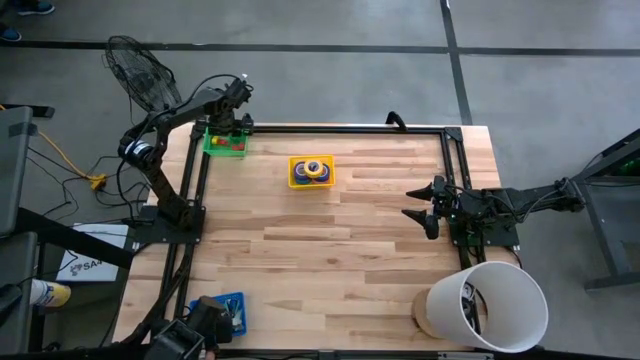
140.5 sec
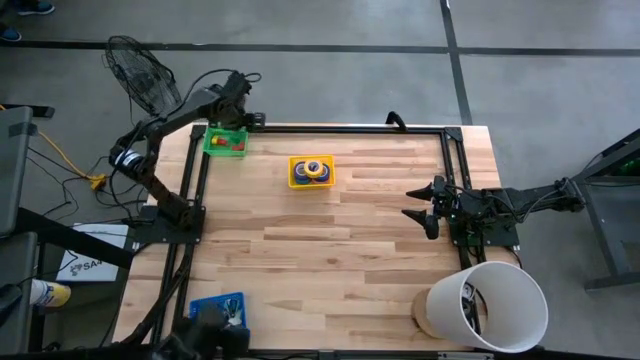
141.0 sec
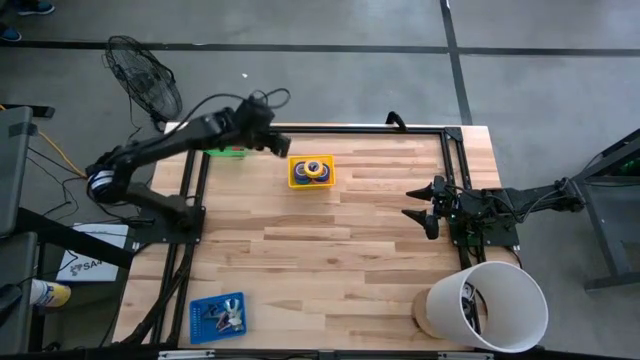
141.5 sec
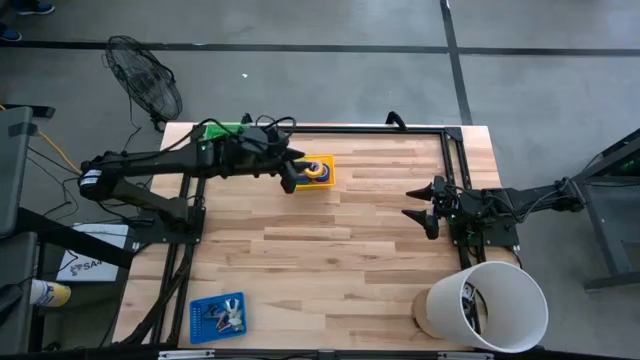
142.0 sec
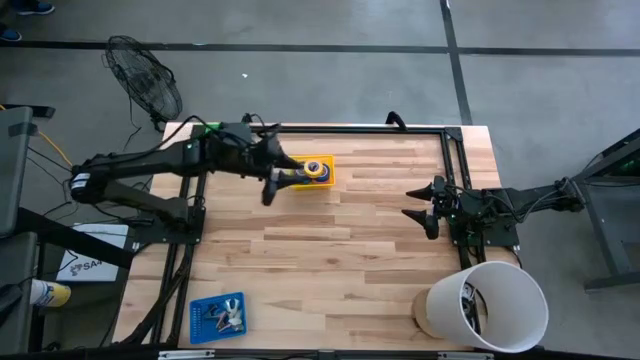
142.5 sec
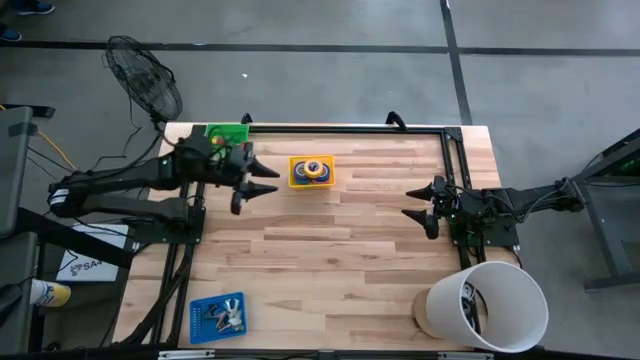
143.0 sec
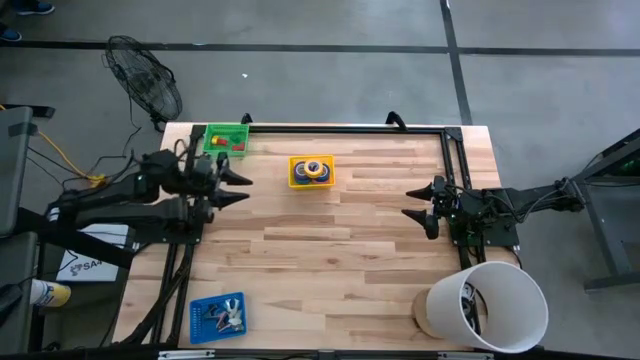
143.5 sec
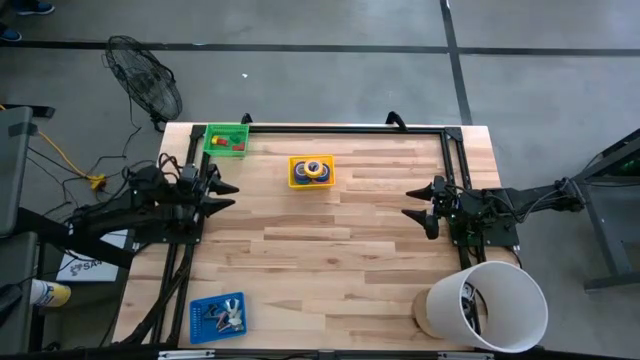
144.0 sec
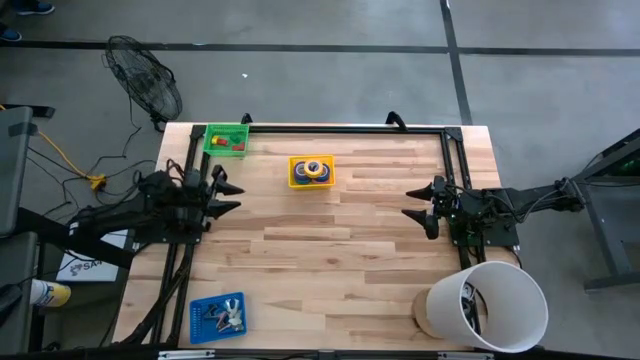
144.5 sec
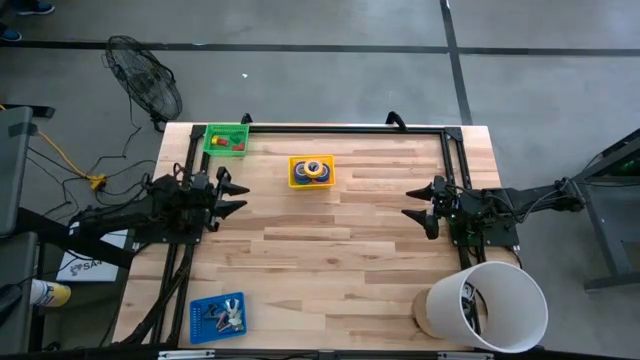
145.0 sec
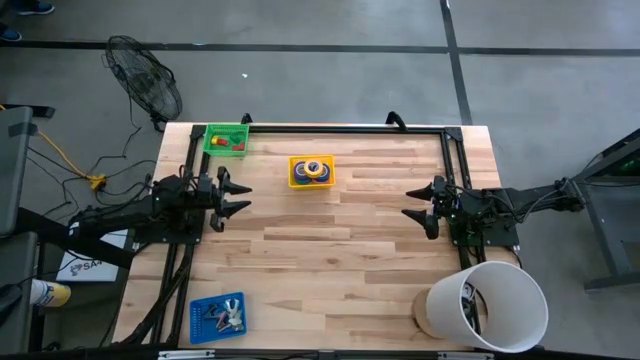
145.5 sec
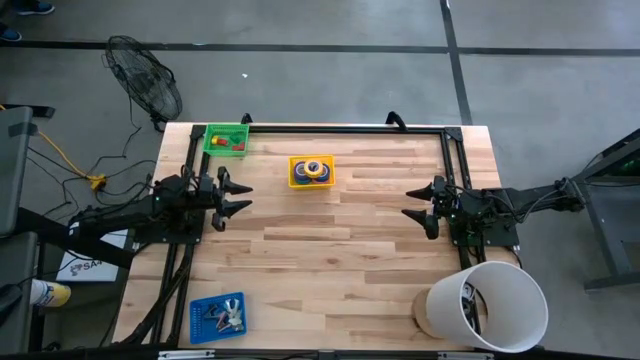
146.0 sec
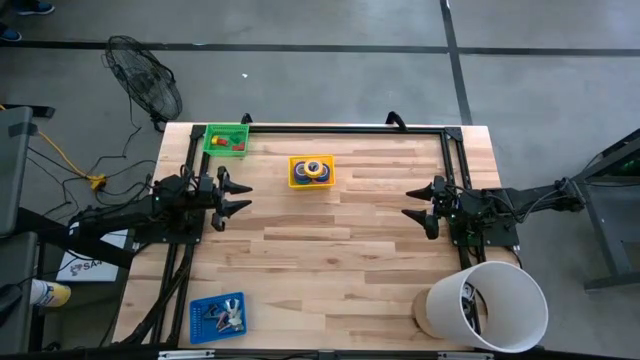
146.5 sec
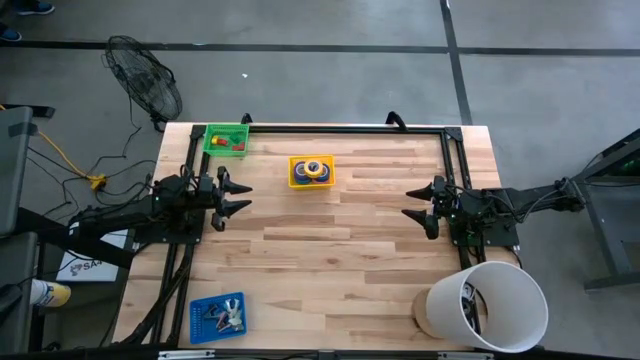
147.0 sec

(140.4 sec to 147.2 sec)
Task: Pick and place Stapler, Stapler remover, tape
Return to Home Position

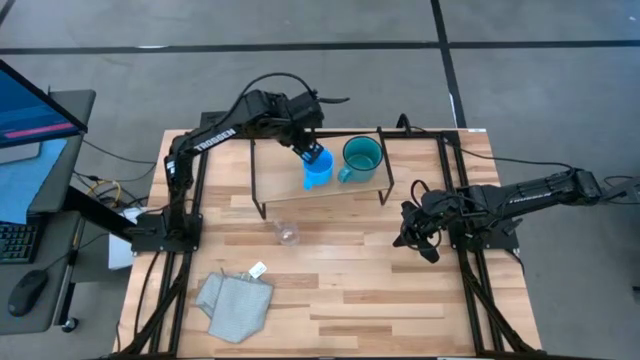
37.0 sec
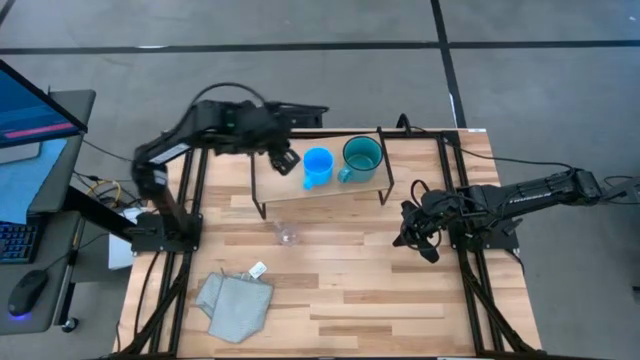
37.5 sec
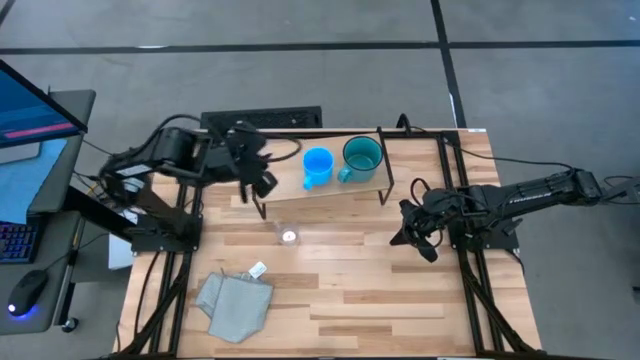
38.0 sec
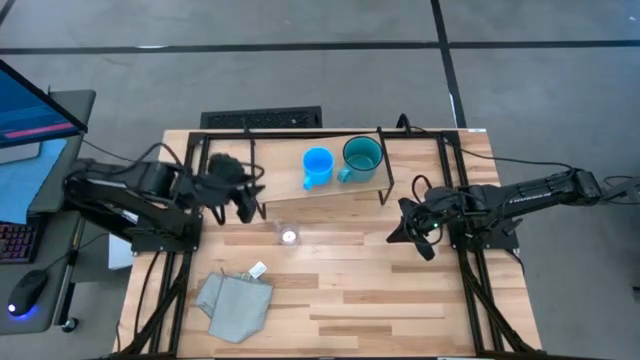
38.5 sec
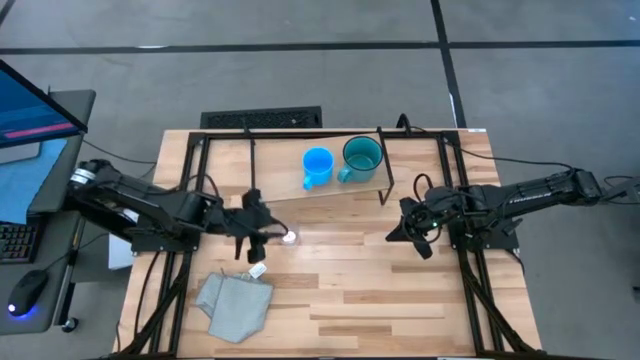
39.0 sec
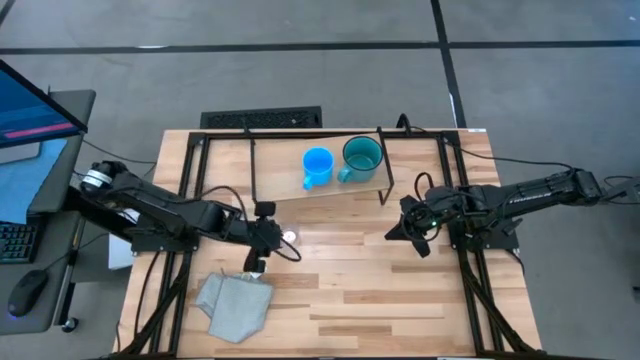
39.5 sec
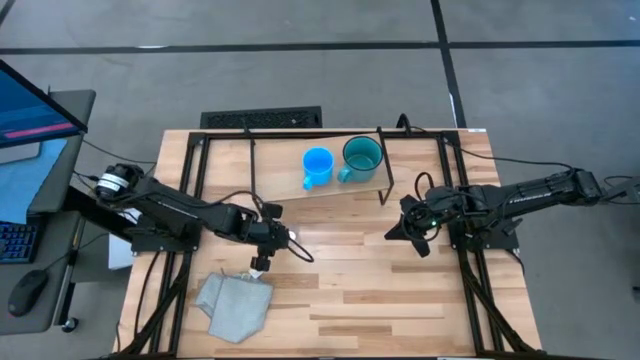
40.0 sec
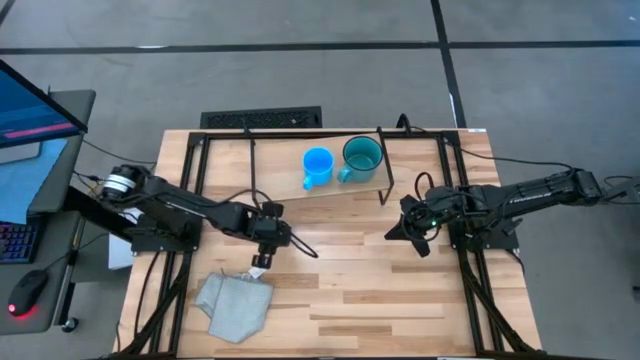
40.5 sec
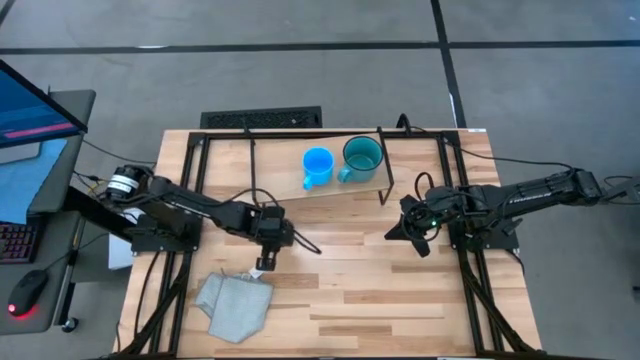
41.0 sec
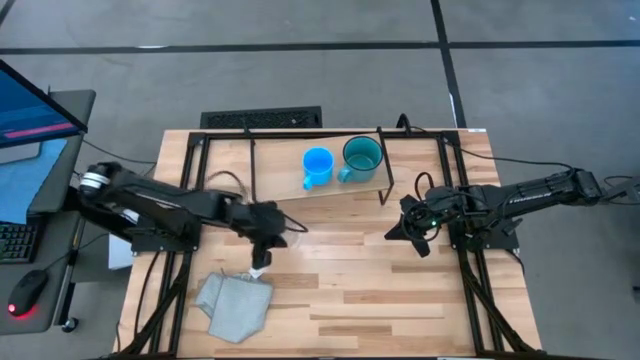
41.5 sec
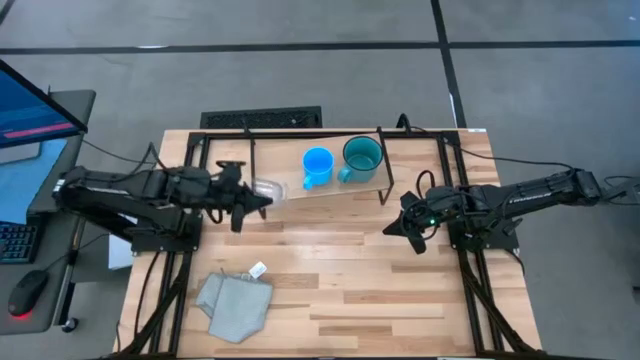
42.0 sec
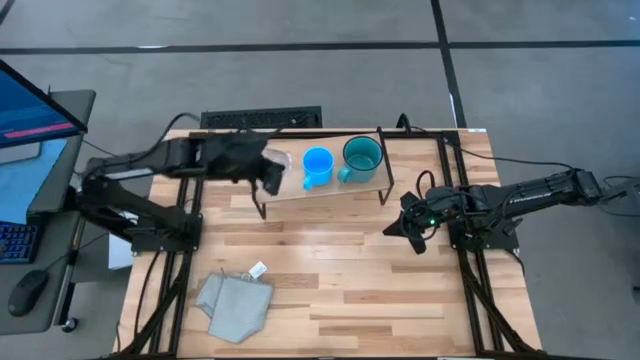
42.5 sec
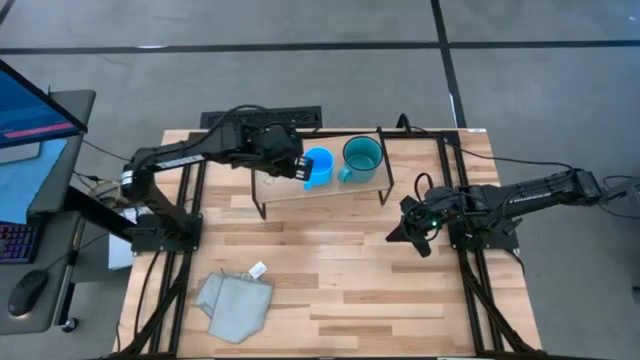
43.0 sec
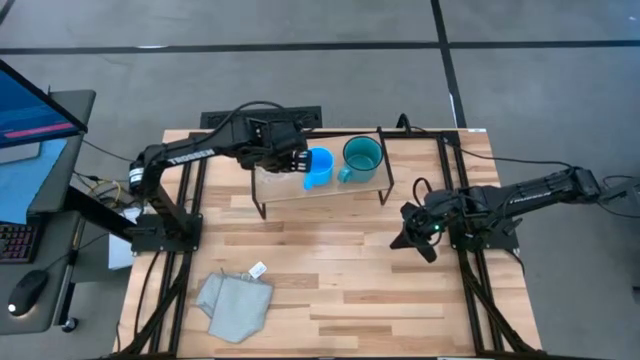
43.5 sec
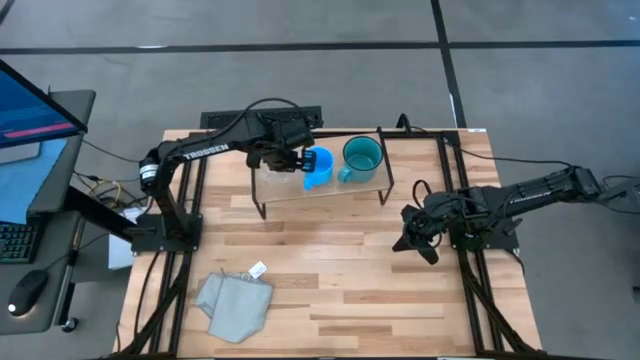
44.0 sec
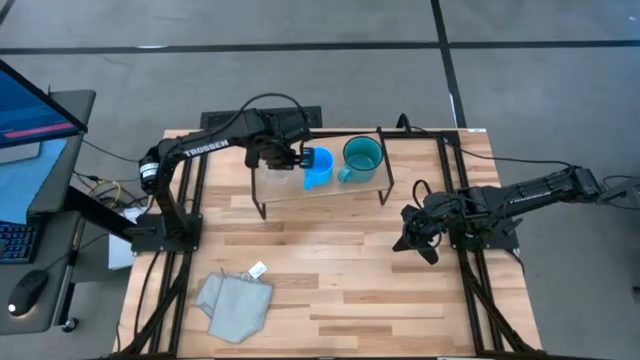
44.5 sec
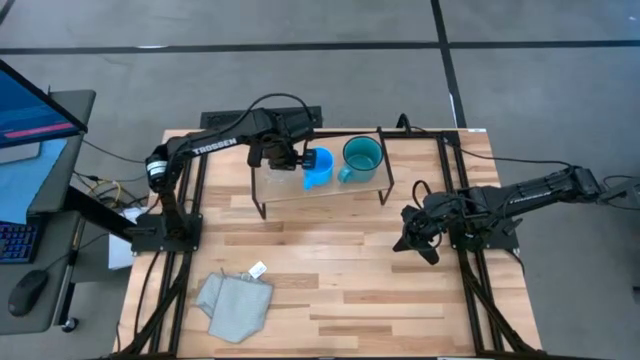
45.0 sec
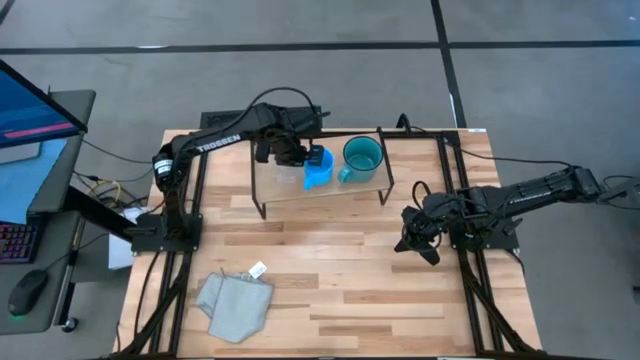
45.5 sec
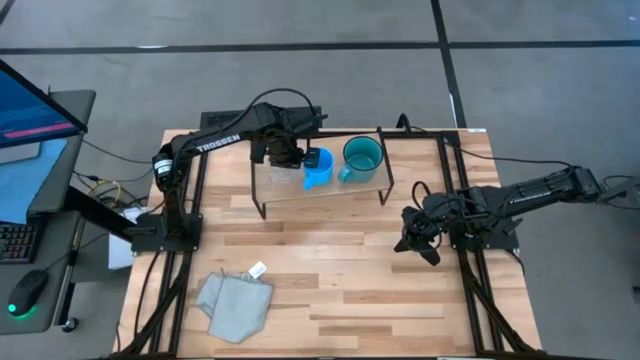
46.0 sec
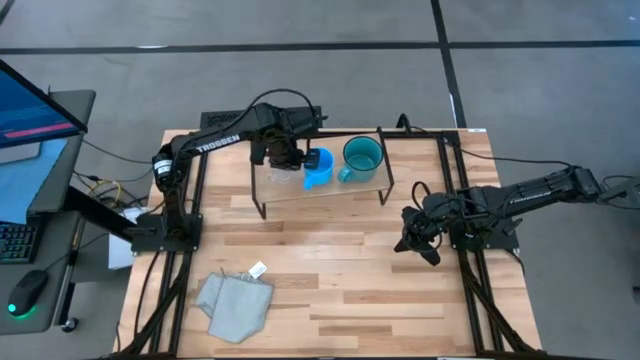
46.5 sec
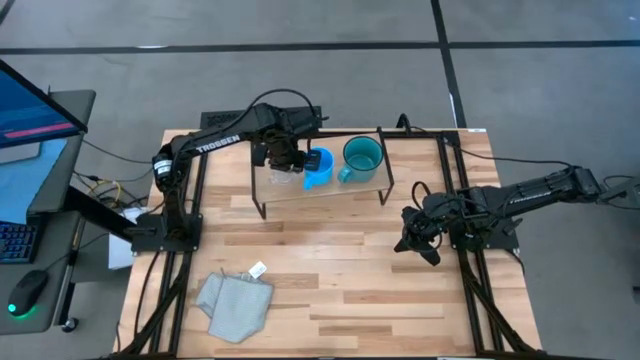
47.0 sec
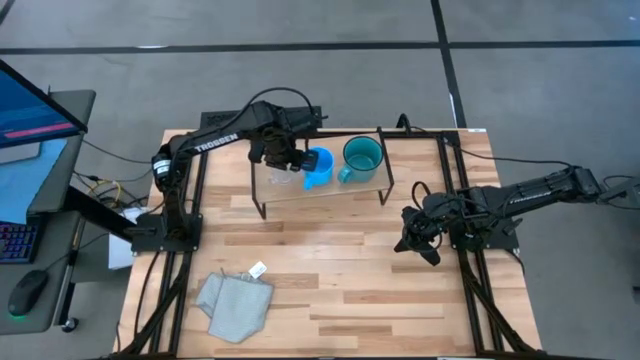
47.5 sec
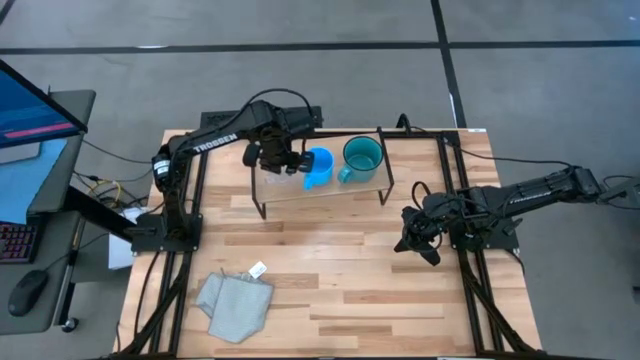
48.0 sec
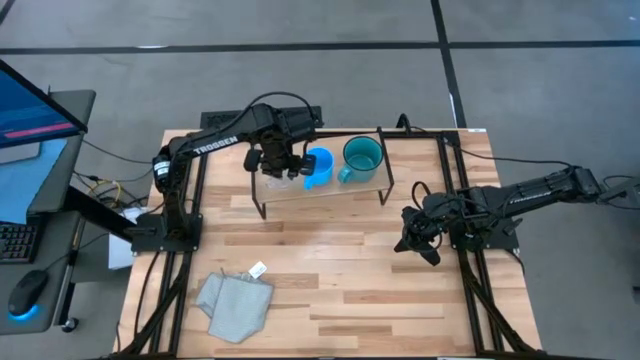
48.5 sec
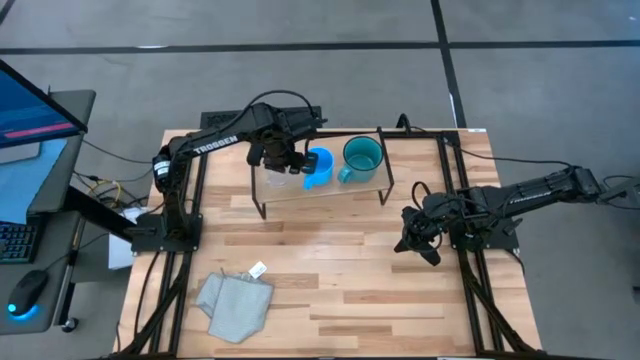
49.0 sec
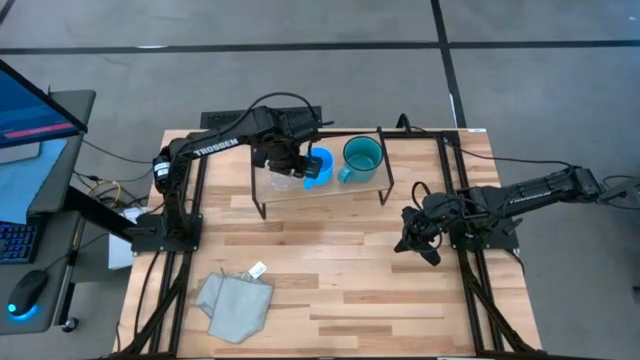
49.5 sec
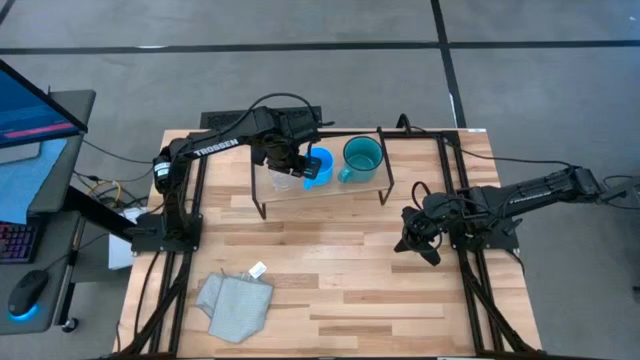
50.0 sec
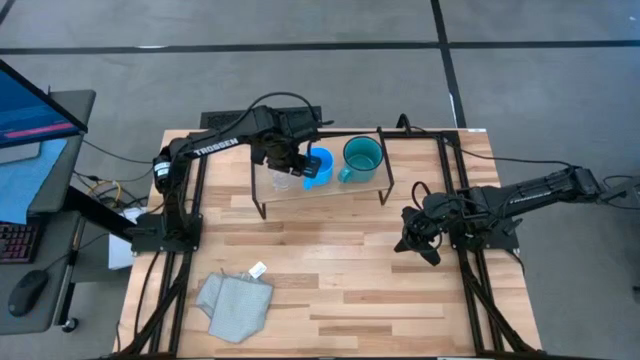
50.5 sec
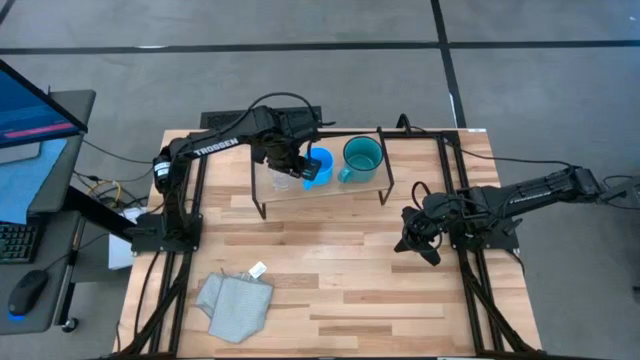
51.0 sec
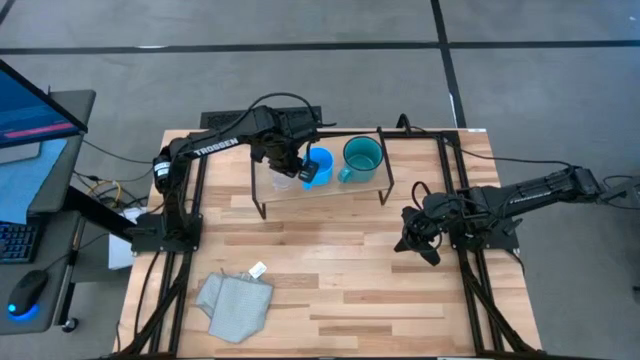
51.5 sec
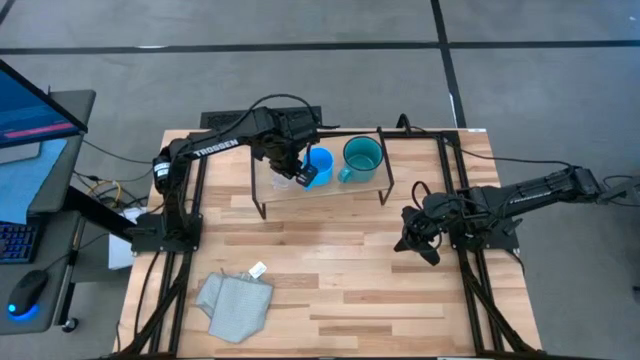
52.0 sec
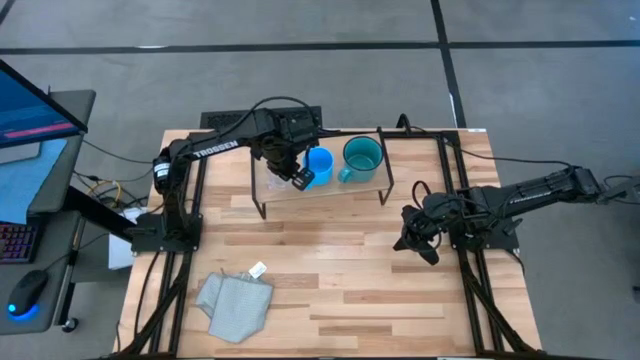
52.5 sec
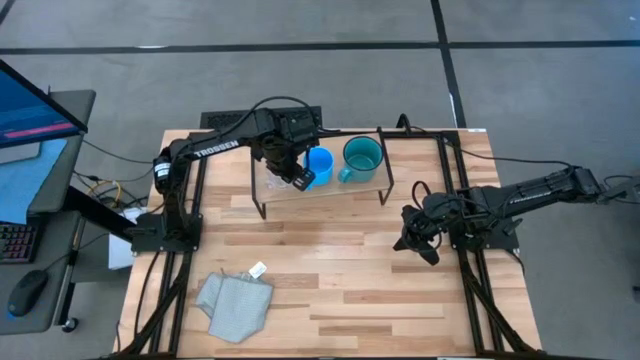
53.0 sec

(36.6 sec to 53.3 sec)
Task: Stack small to large cups/mugs on shelf
Put the transparent mug on the shelf
